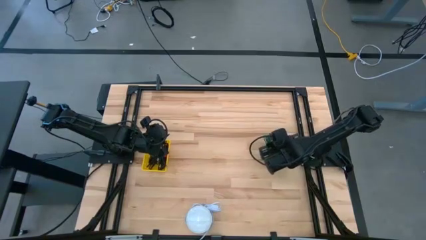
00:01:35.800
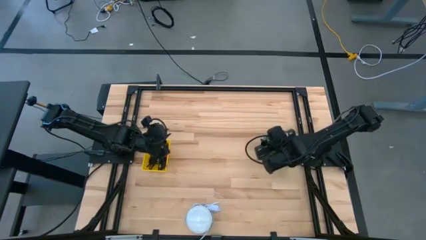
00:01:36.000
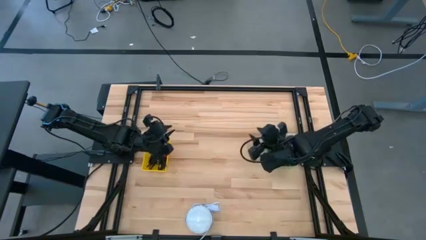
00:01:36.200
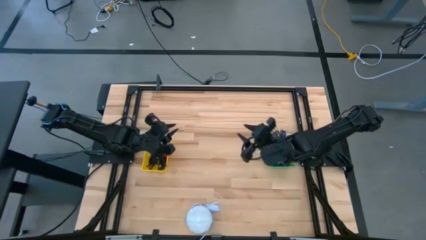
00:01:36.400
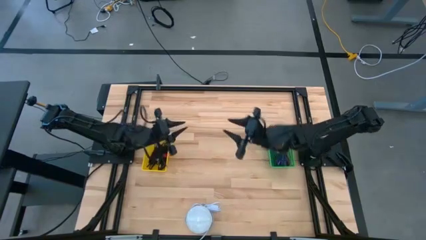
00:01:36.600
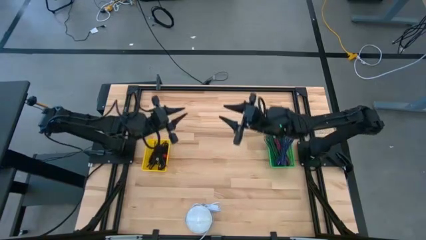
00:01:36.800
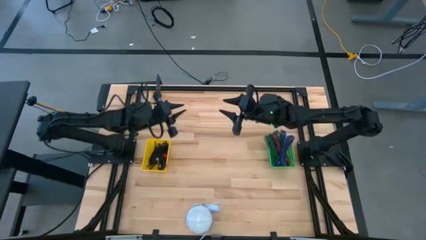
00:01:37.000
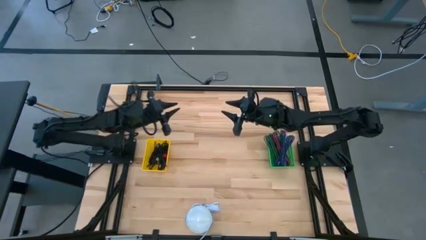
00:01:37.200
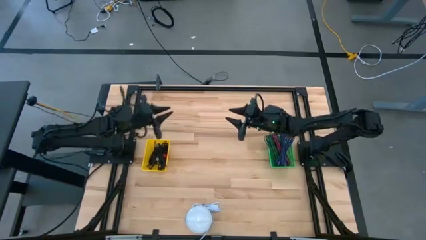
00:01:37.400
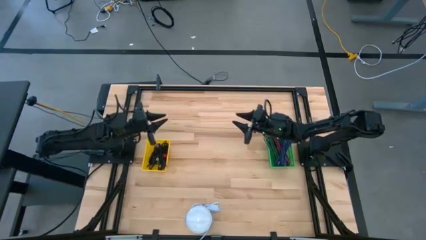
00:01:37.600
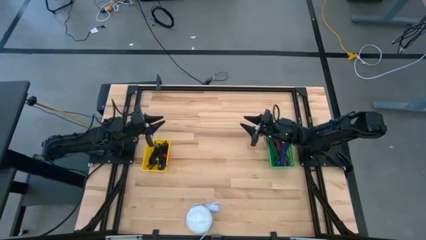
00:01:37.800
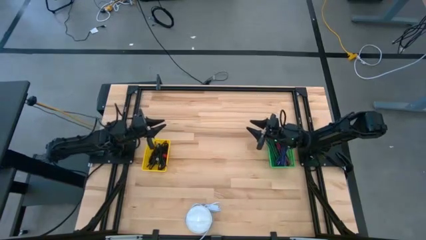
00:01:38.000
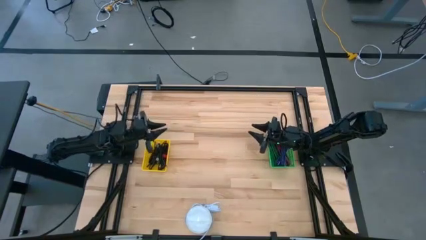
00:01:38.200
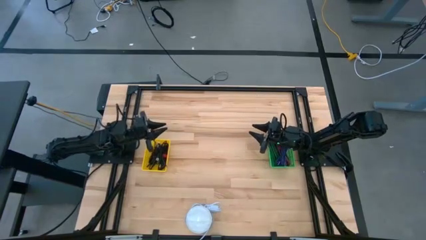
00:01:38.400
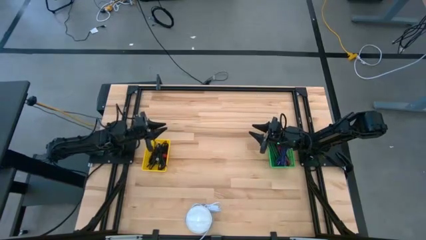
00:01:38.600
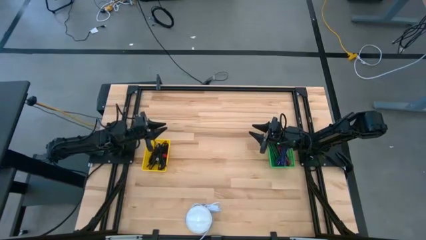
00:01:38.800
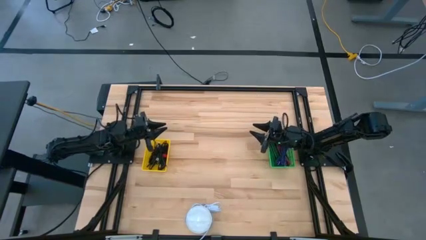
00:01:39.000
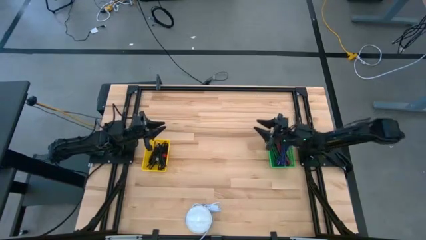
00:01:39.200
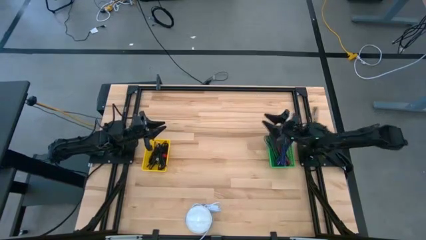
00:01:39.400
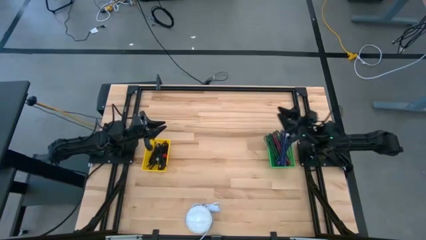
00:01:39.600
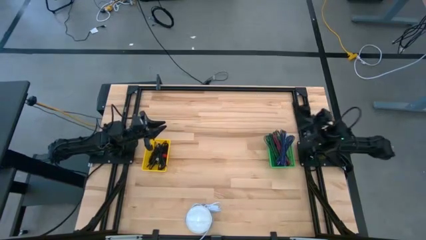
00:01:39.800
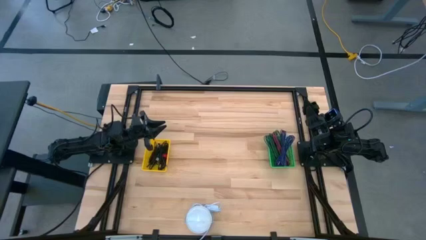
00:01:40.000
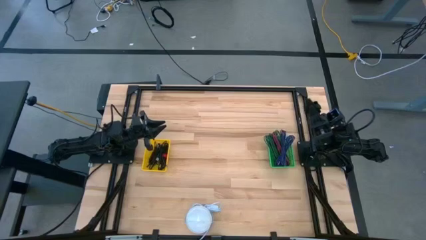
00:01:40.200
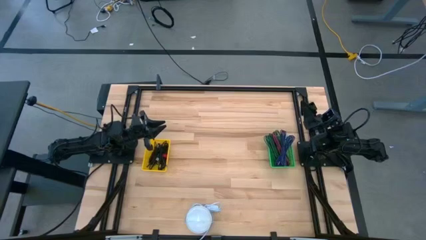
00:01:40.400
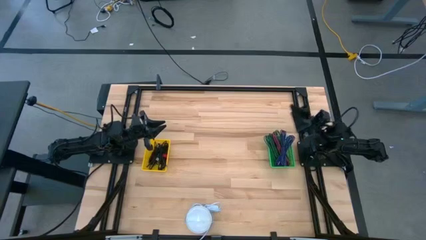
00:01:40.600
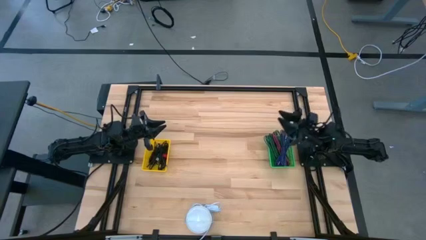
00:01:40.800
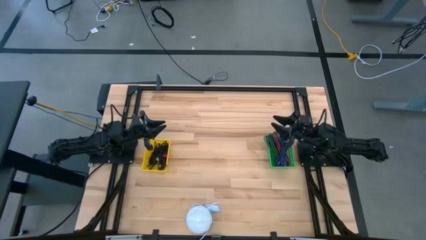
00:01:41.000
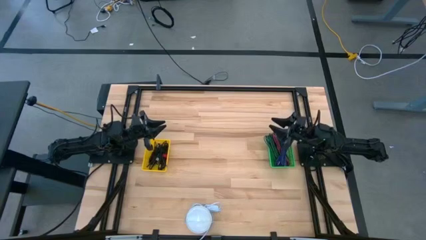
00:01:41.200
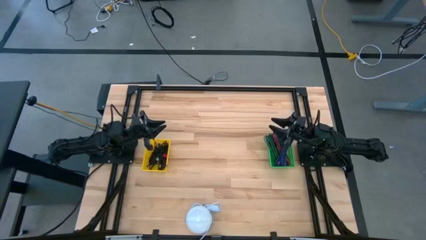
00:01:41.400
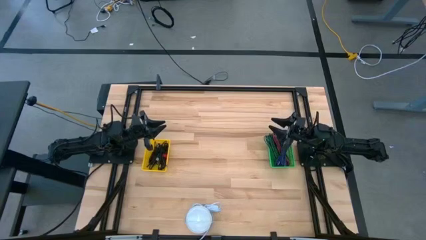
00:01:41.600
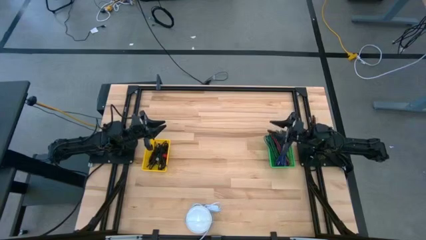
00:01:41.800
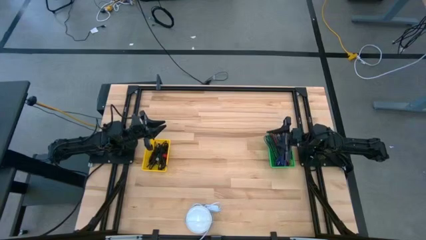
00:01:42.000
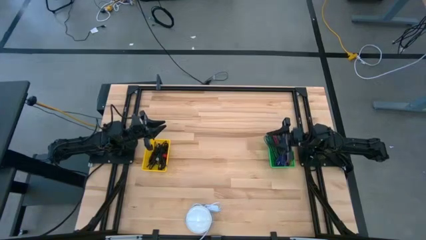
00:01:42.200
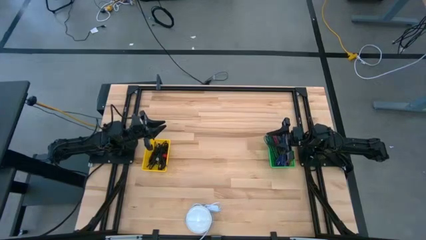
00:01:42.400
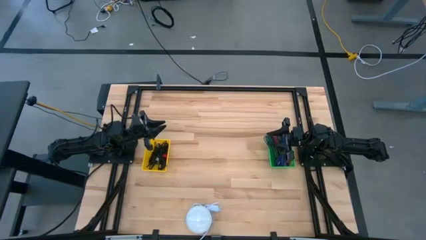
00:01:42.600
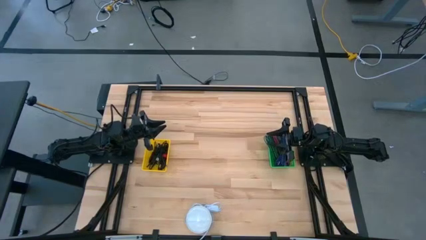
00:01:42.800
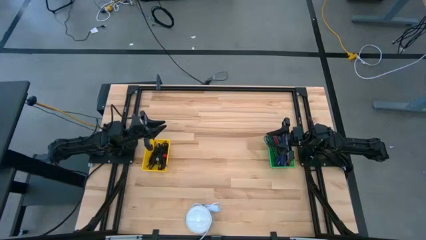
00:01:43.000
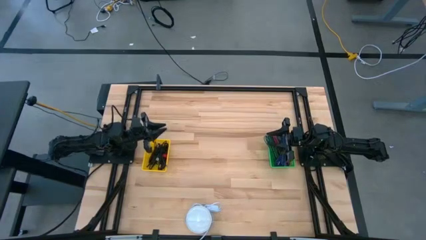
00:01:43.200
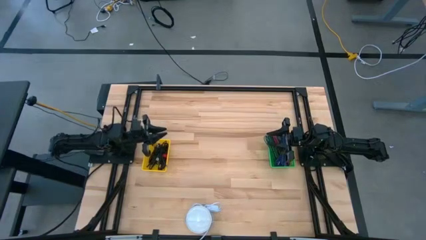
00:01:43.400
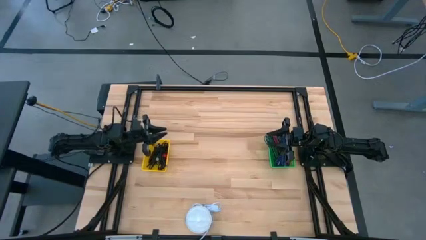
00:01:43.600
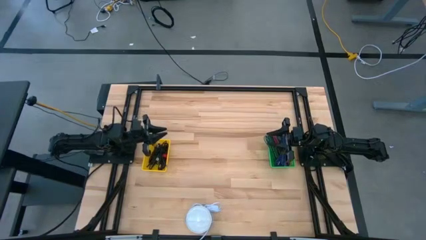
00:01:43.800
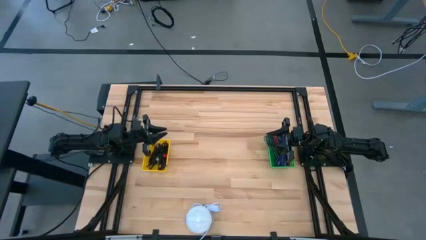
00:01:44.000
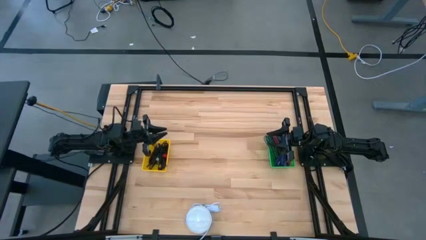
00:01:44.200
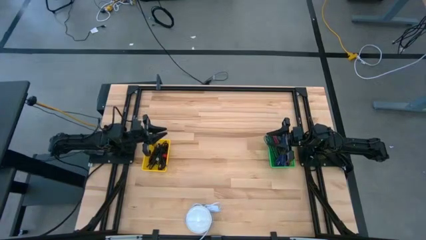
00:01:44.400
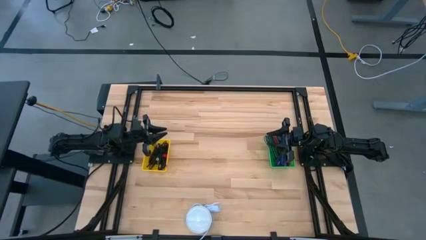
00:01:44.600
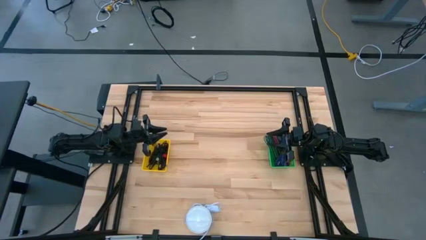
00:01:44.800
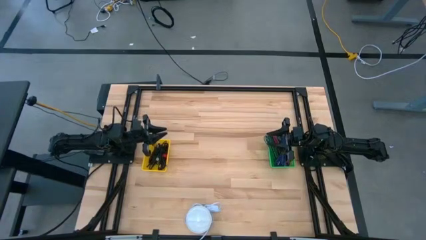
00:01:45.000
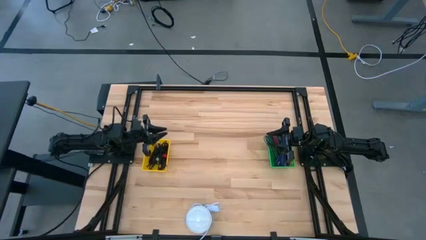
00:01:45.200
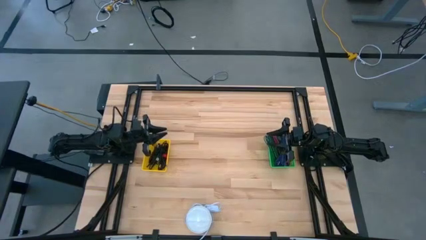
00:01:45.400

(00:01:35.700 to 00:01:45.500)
Task: Pick & Place USB Port
Return to Home Position

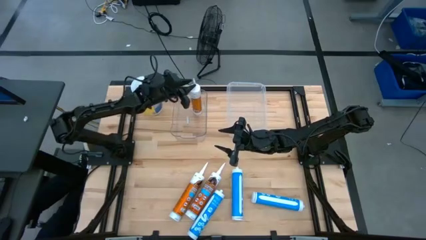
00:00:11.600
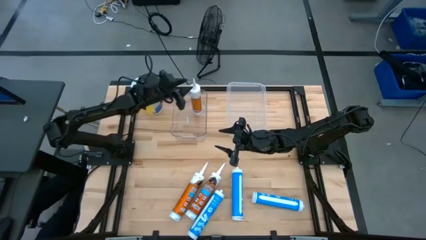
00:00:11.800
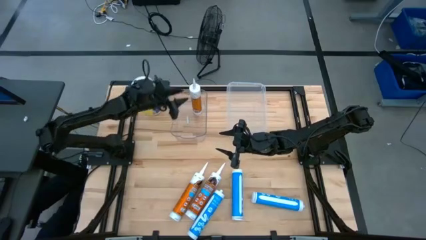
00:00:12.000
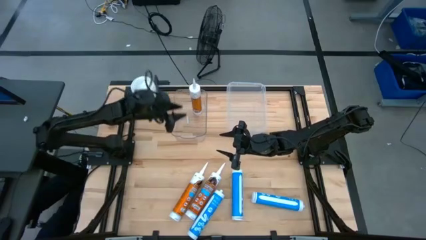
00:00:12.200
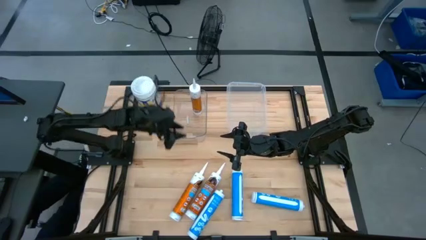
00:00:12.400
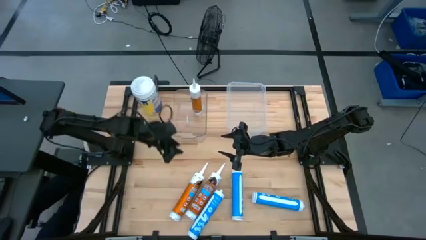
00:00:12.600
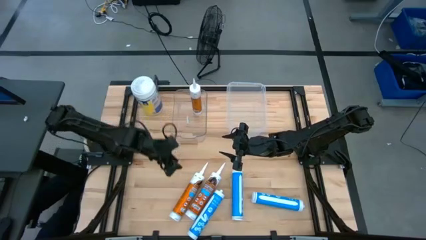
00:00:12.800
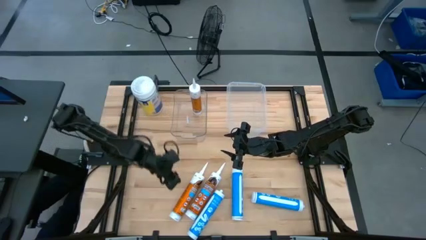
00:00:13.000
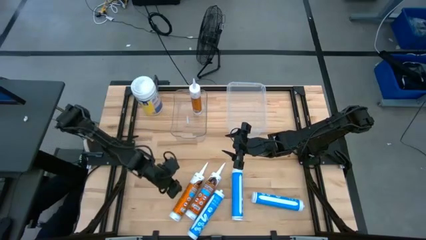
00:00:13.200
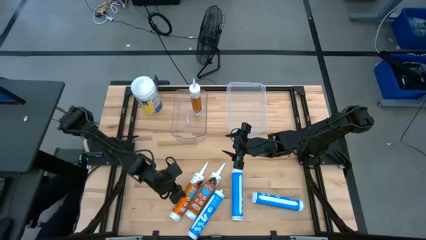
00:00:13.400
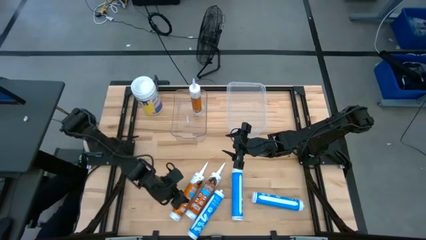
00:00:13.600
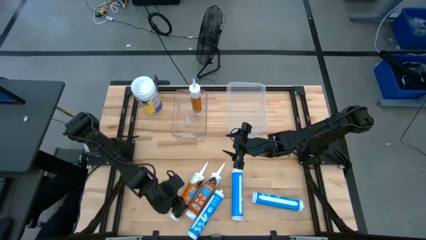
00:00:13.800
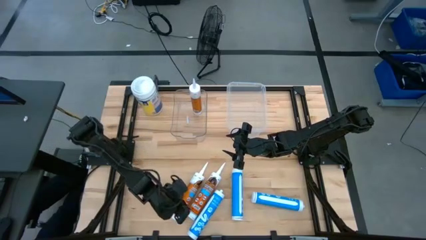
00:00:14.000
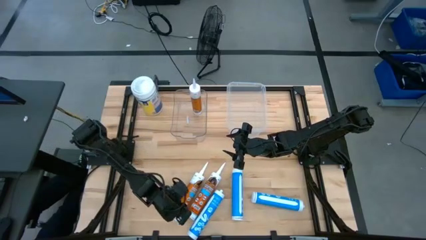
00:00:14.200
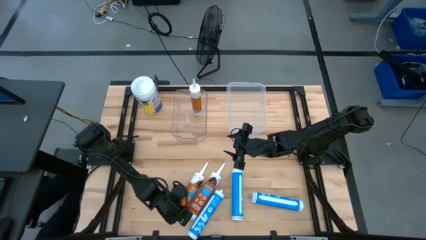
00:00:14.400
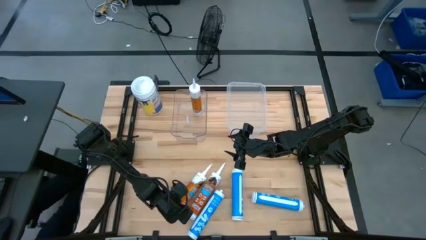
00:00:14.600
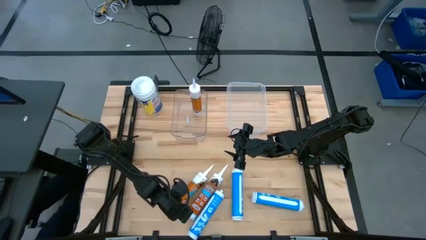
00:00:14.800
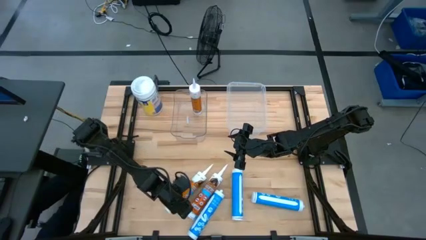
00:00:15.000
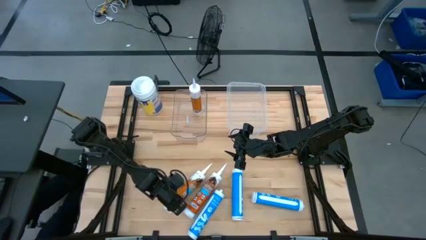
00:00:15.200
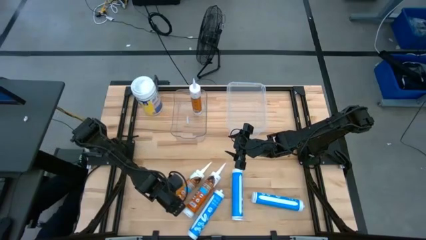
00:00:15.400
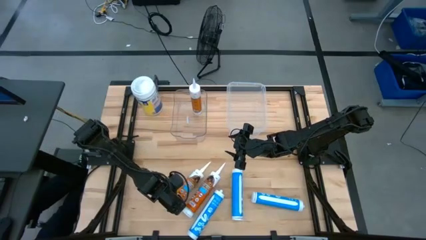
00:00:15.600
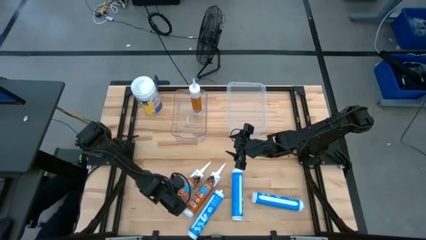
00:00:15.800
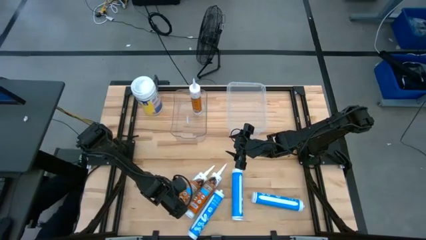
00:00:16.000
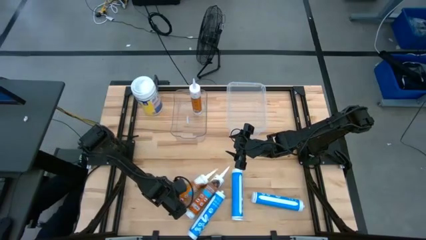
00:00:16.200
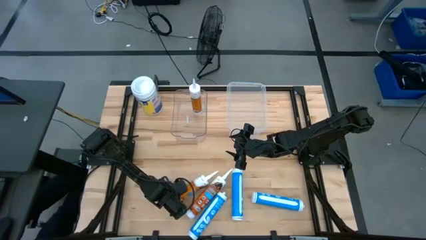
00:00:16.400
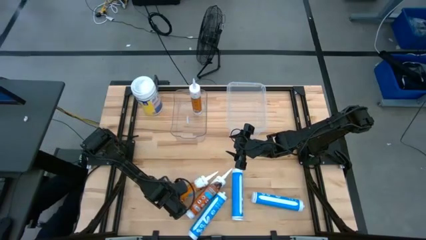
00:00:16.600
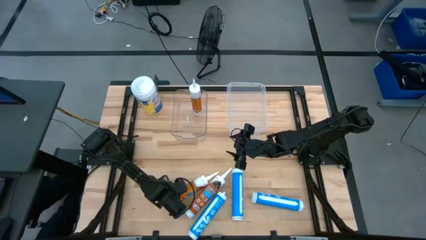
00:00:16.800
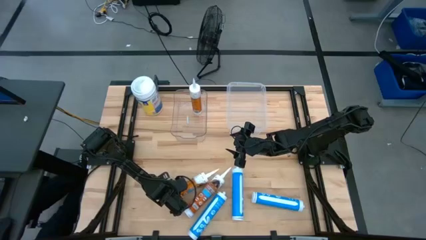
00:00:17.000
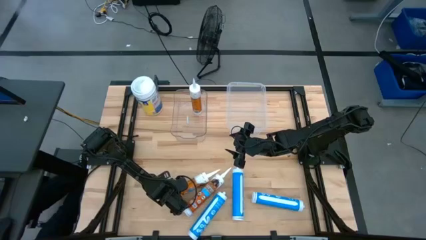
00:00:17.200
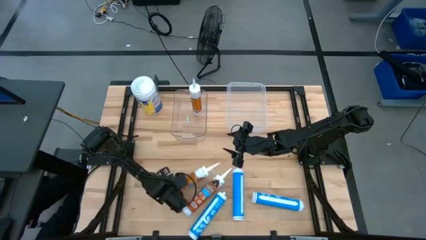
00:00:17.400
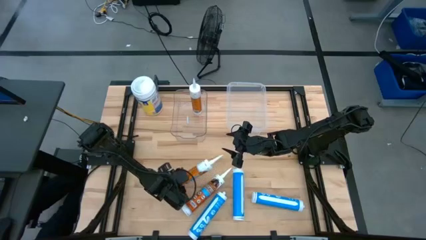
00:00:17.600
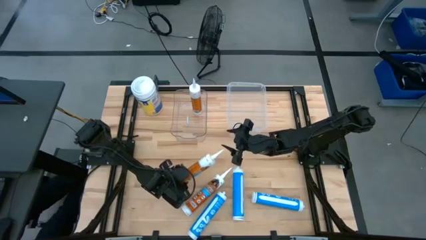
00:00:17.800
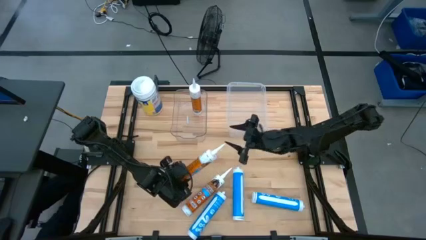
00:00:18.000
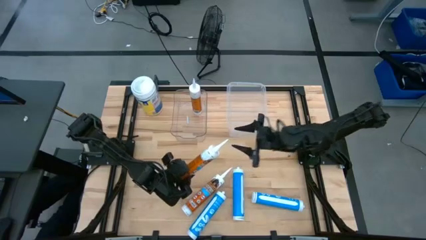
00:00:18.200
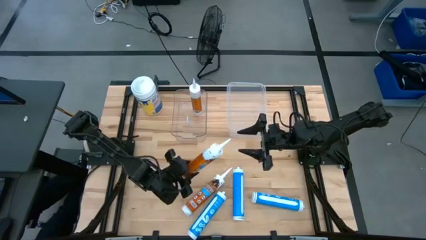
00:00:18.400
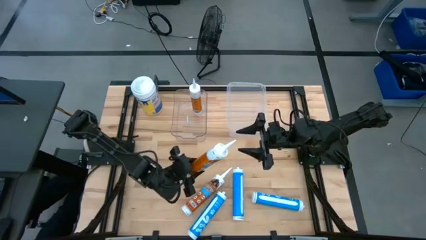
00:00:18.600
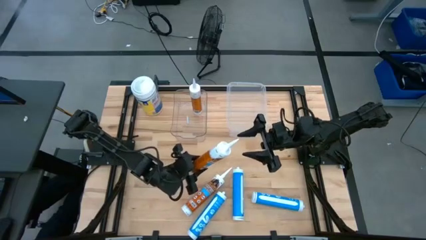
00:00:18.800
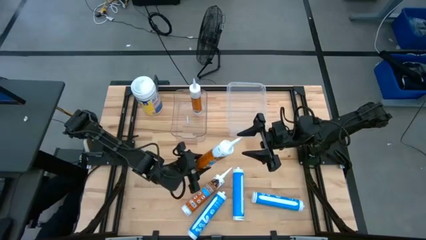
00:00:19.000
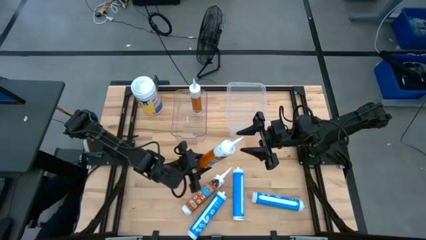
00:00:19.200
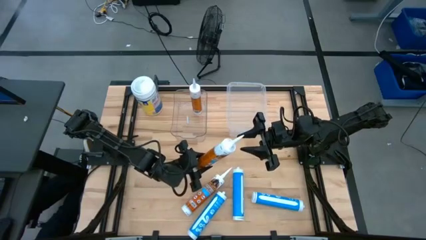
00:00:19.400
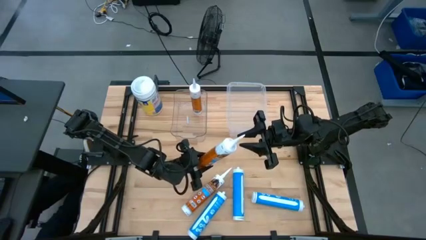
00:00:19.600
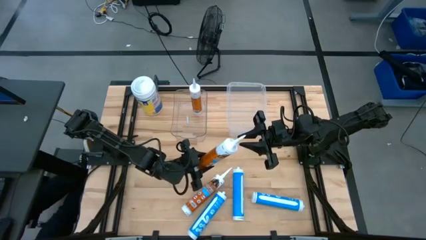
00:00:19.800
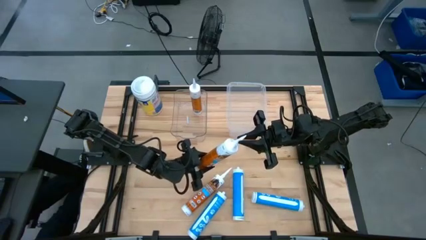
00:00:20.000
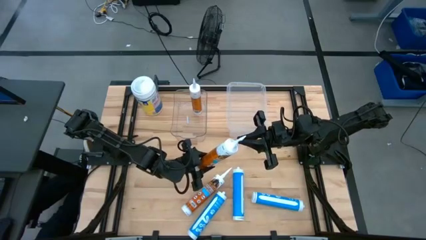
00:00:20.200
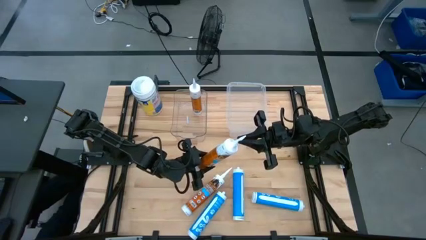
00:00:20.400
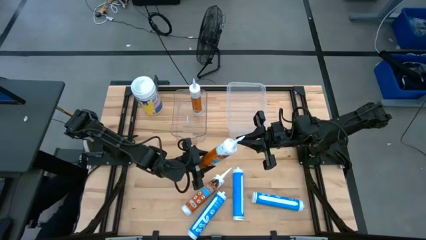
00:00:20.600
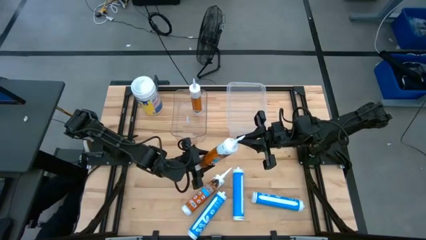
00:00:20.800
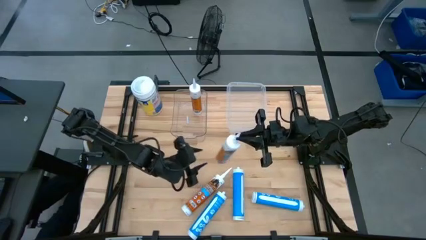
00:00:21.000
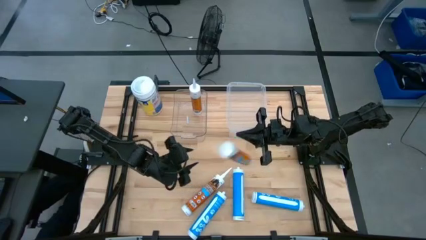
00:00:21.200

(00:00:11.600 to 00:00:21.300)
Task: Pick & place silicon tubes, Sealant and Lysol wipes
Put the left orange sealant into the left transparent bin
